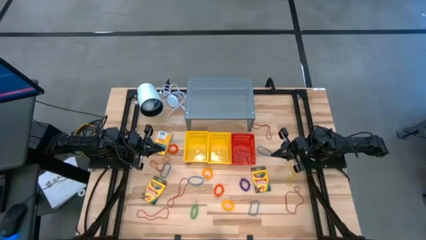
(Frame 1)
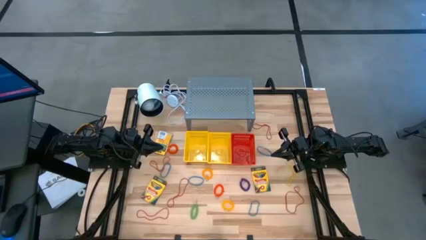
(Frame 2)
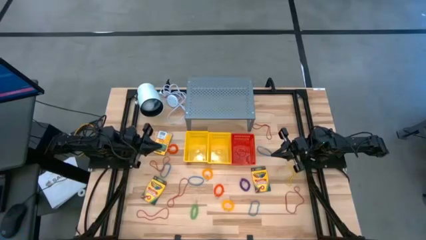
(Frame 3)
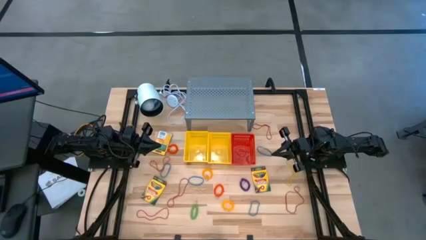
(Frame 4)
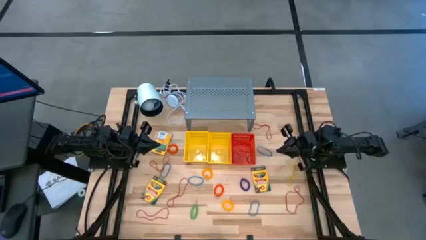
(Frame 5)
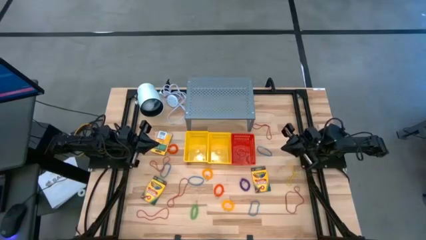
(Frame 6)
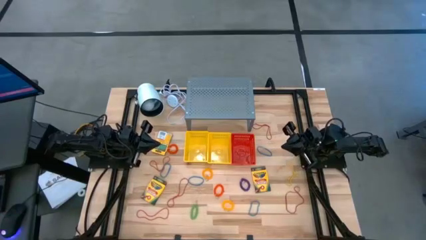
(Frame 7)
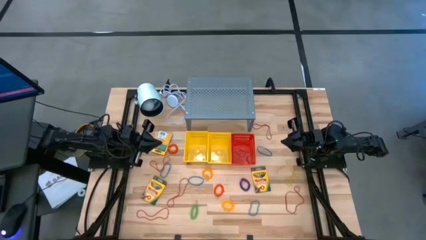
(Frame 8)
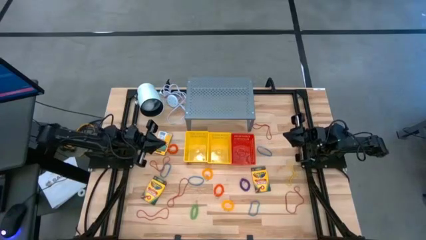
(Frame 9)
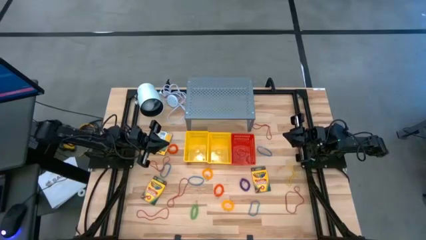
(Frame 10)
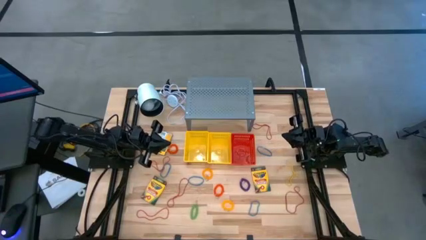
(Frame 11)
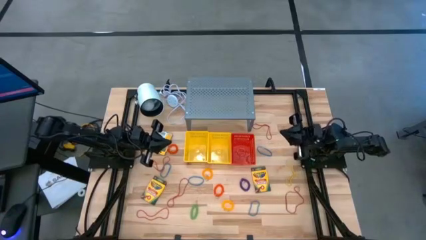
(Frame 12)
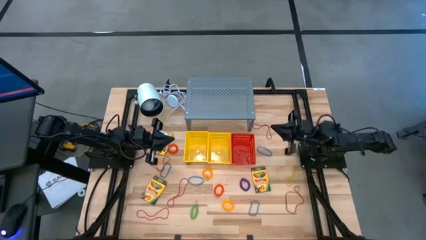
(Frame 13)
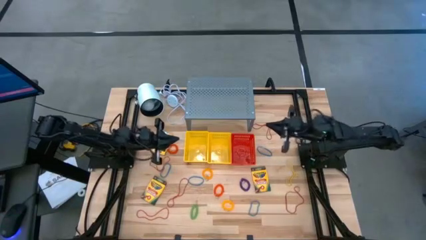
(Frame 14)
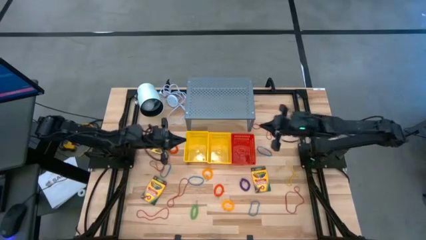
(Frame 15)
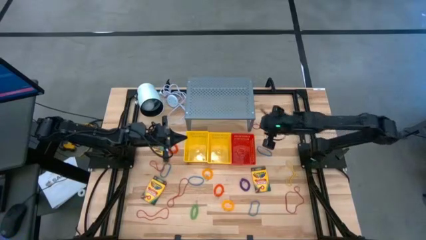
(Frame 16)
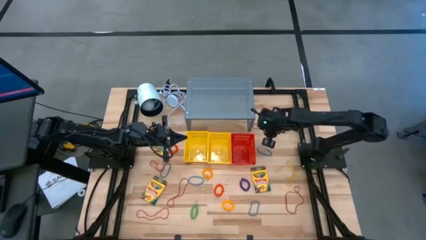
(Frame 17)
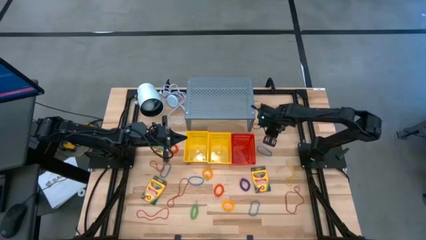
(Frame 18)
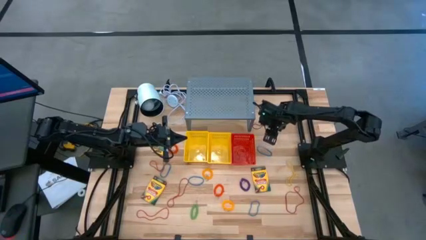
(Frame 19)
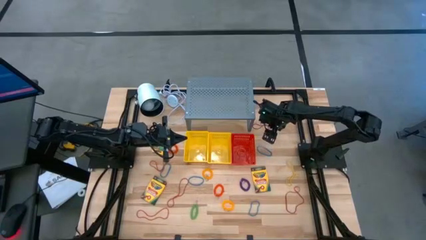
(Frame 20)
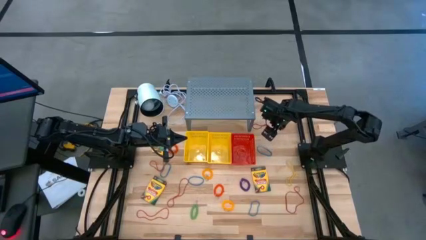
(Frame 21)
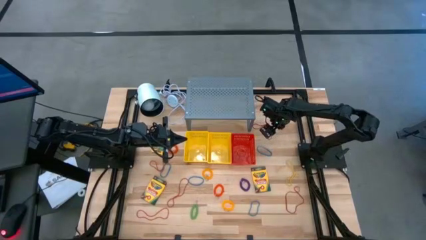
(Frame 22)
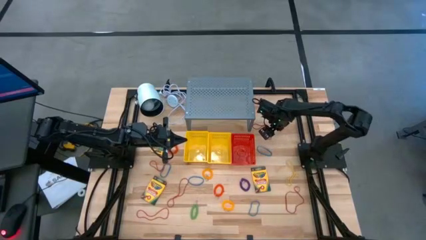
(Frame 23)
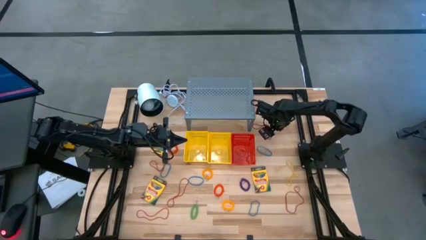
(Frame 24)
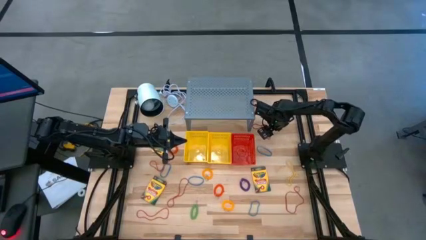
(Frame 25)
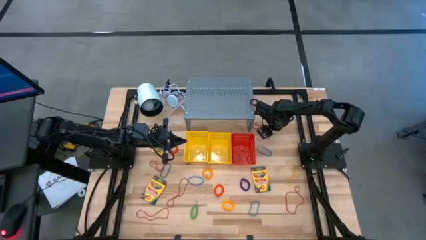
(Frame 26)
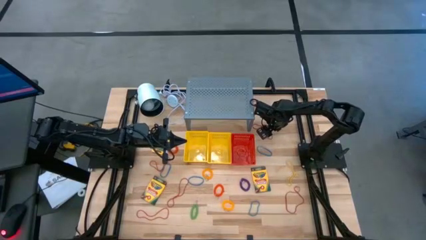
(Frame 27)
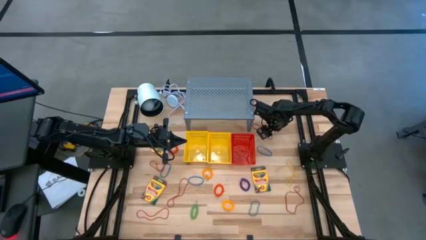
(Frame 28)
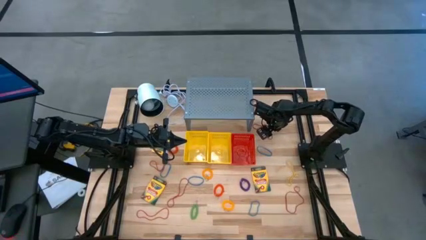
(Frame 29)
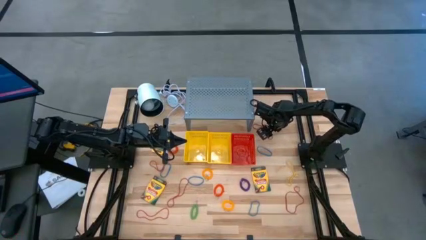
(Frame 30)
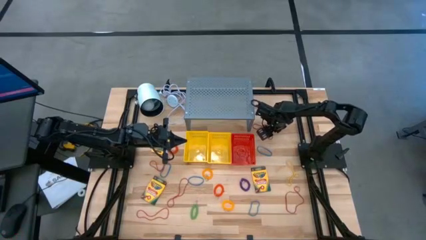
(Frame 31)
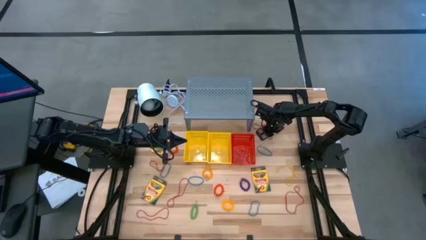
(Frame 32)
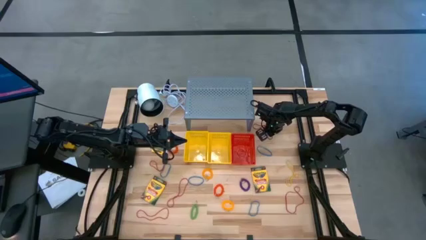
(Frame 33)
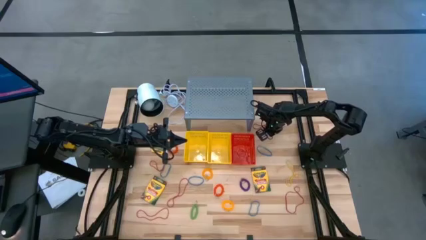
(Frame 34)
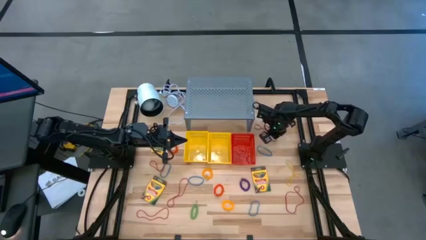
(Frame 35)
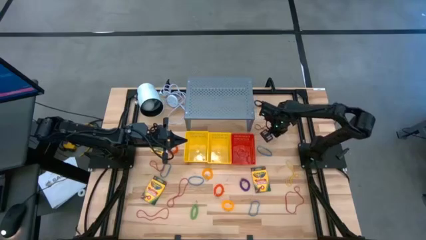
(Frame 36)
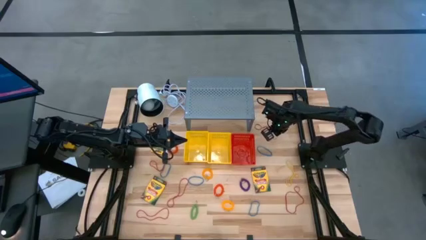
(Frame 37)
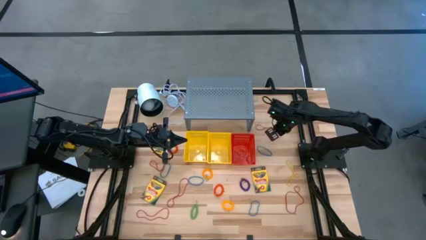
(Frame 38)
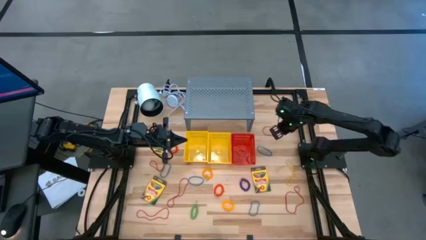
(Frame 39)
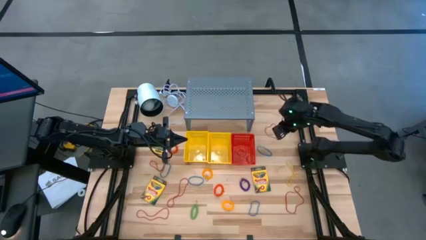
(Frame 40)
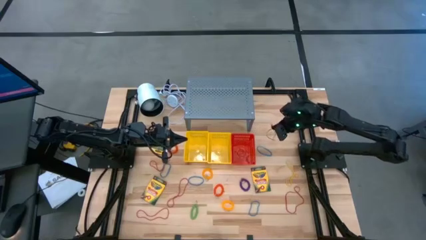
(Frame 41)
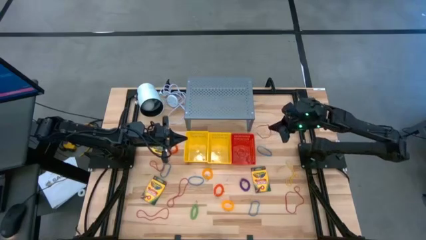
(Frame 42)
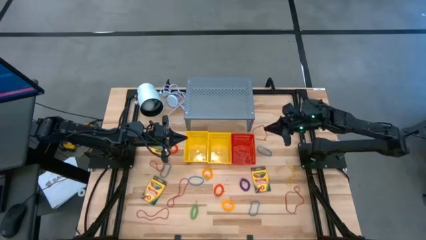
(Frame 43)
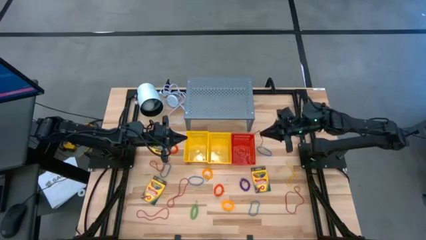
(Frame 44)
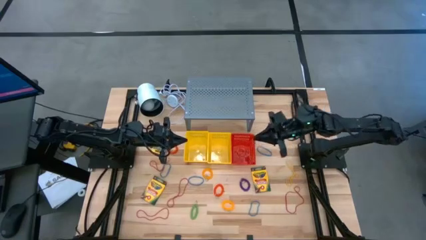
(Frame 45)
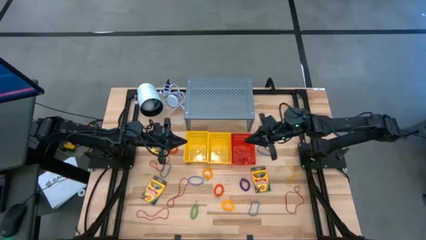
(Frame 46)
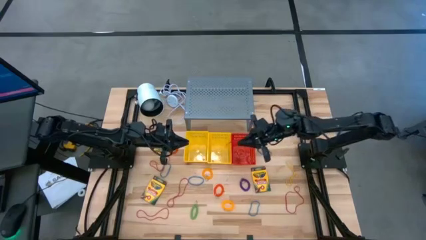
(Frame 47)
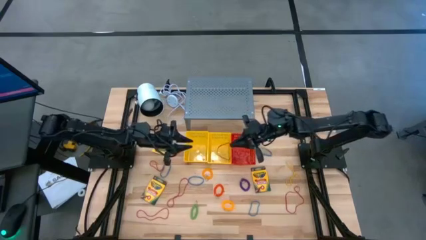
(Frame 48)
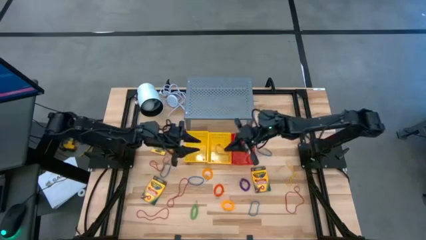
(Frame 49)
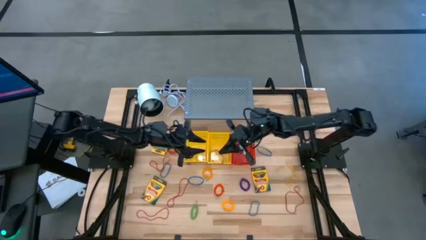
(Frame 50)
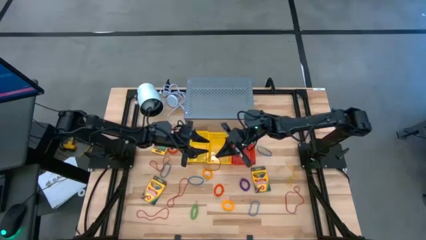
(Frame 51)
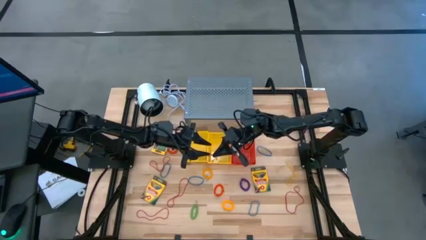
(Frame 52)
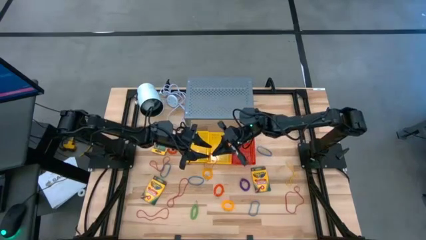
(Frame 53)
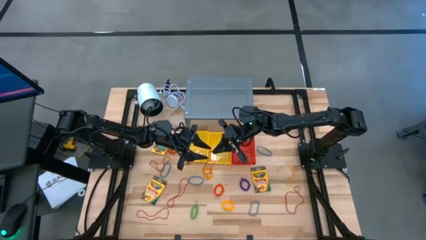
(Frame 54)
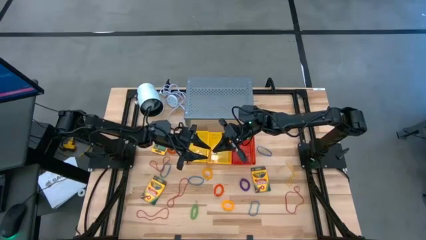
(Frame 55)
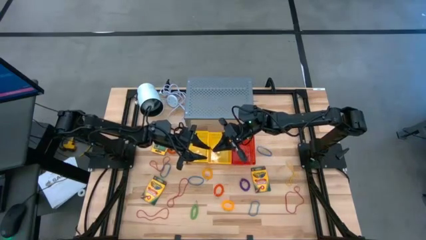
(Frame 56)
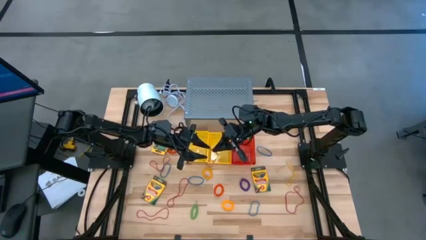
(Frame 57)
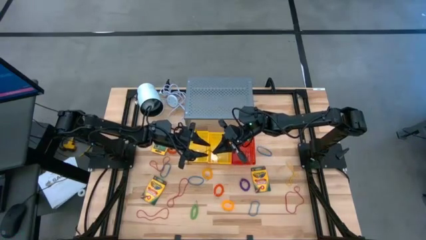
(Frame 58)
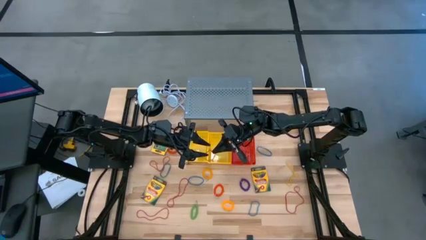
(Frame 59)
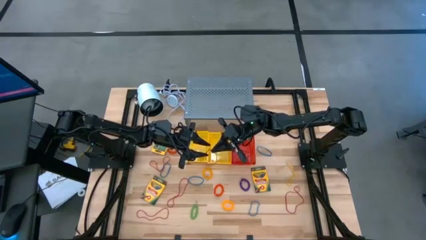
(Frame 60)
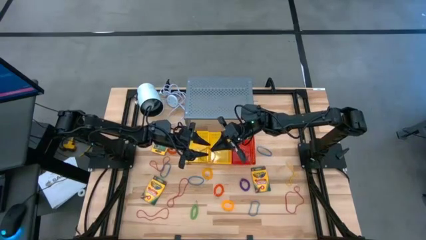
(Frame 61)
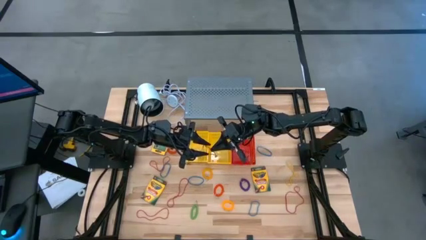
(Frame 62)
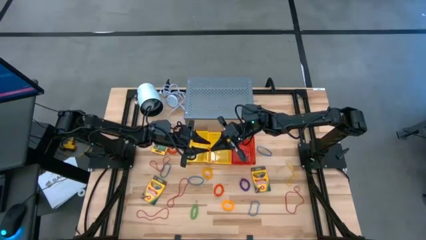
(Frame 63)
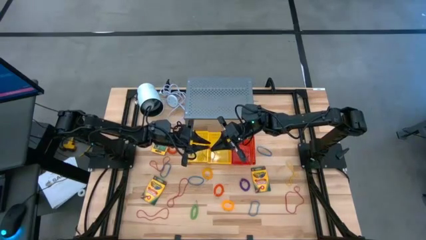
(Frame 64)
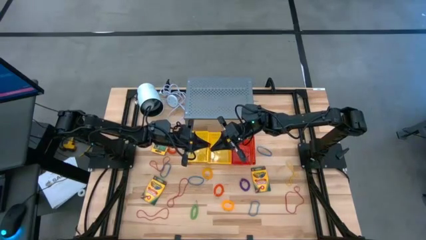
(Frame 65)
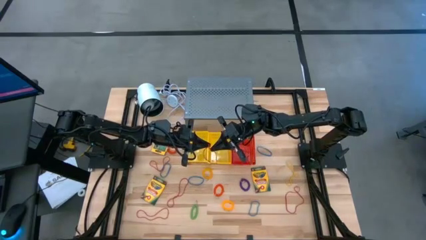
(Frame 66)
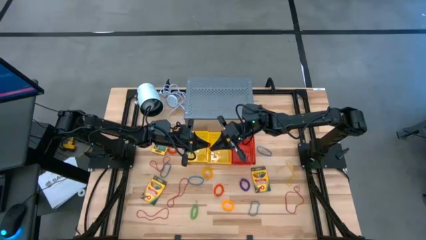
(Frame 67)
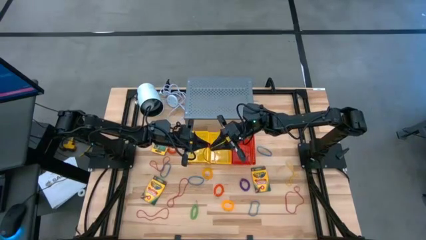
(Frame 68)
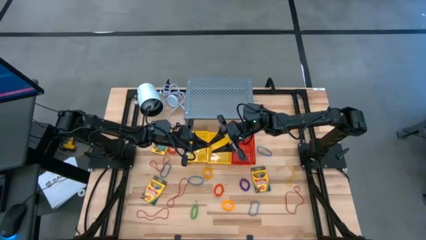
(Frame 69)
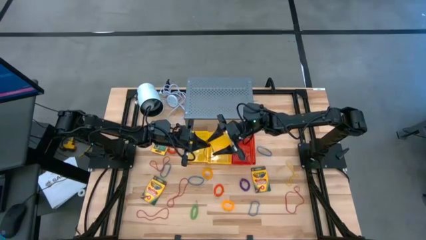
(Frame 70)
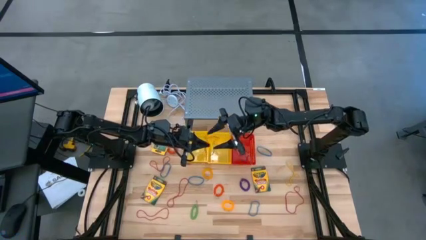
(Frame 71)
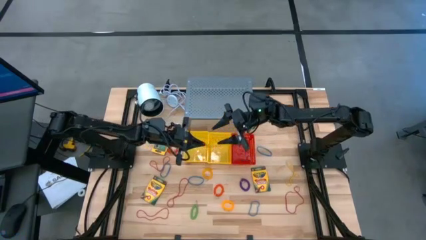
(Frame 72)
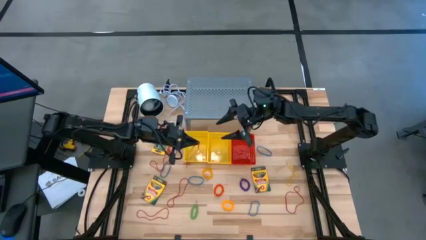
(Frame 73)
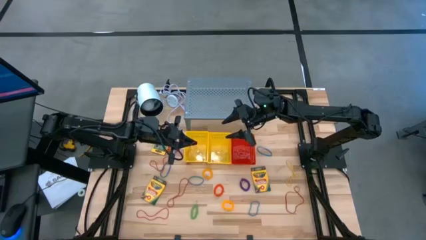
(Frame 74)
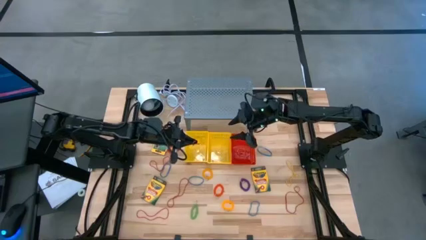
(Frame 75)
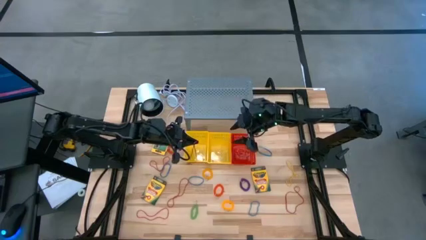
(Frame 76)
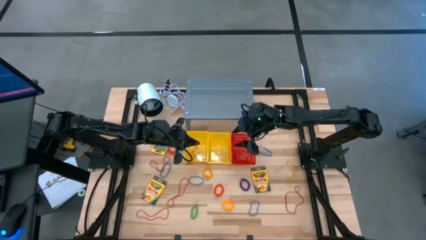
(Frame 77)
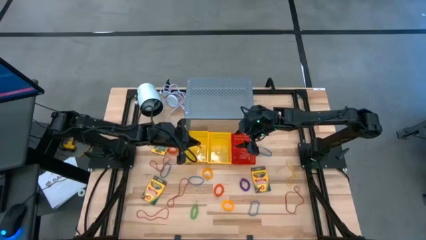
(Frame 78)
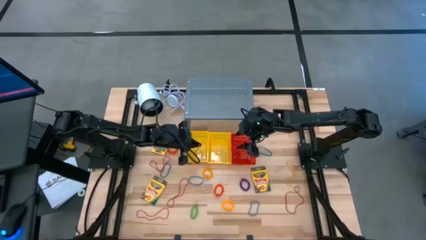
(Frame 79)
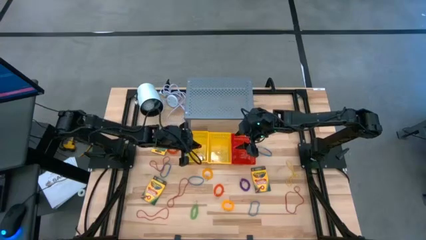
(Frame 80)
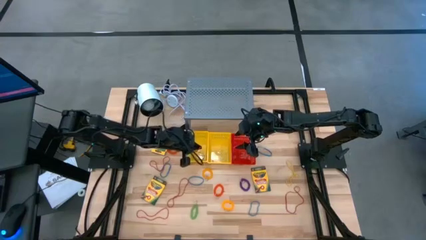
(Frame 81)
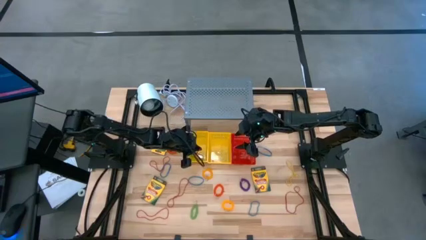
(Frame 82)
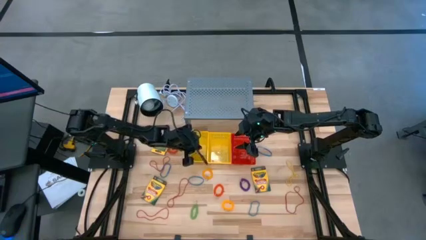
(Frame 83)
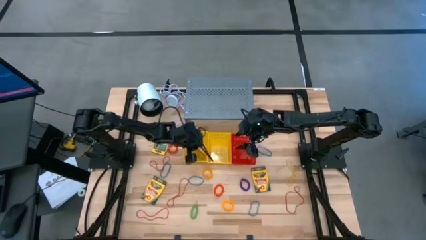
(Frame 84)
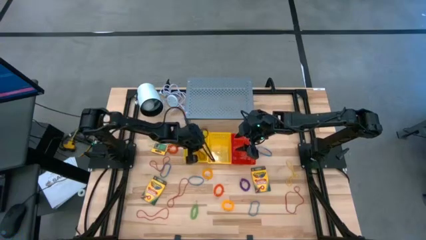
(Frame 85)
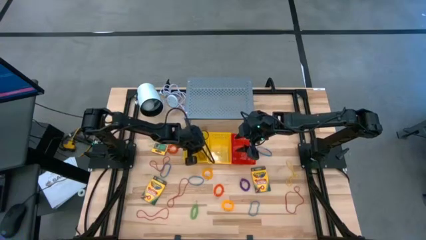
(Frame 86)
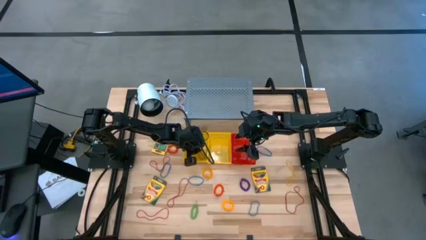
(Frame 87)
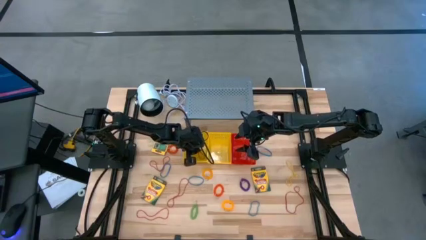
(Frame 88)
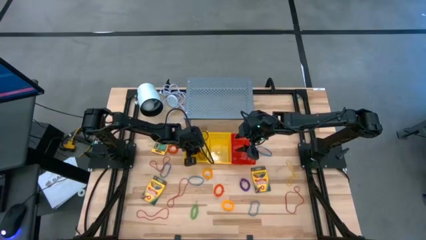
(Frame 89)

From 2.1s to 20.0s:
Task: Pick & Place Office Desk Supplies
Put the red rubber band into the left yellow basket
